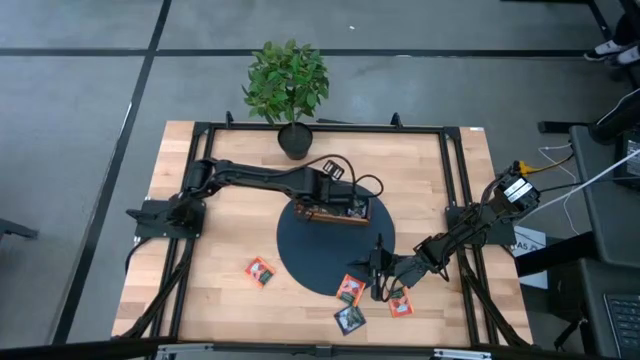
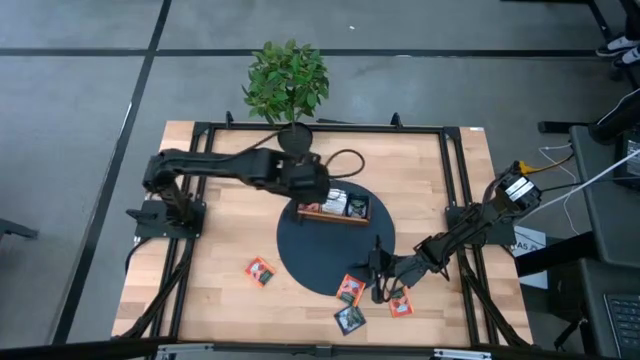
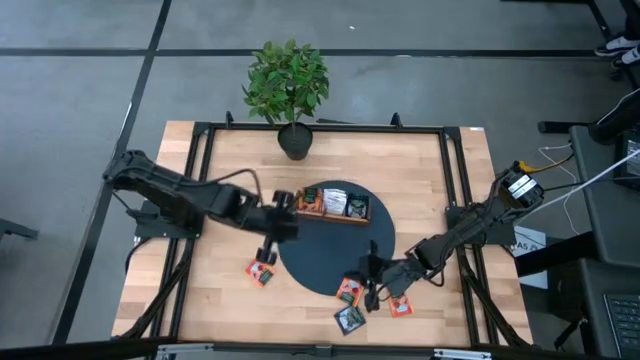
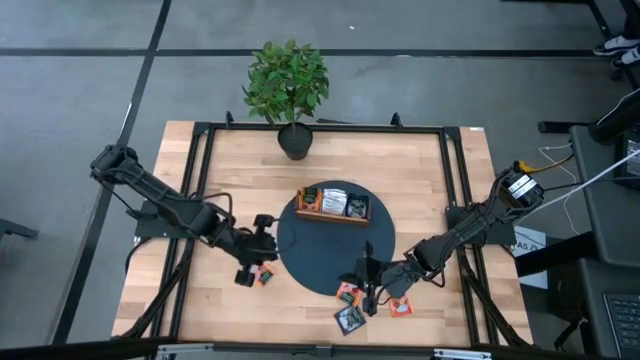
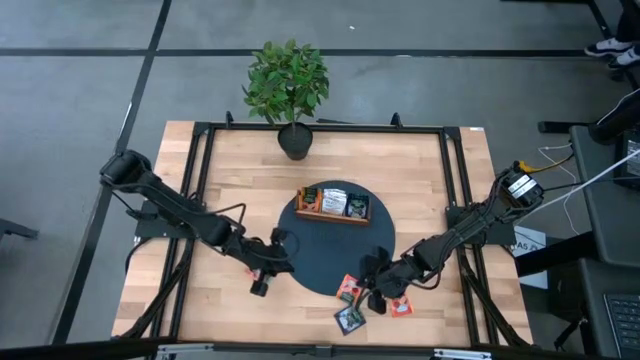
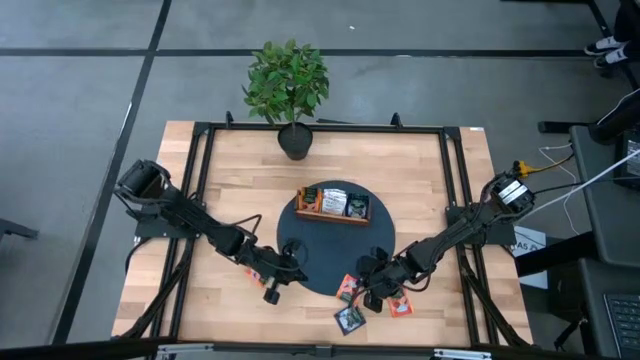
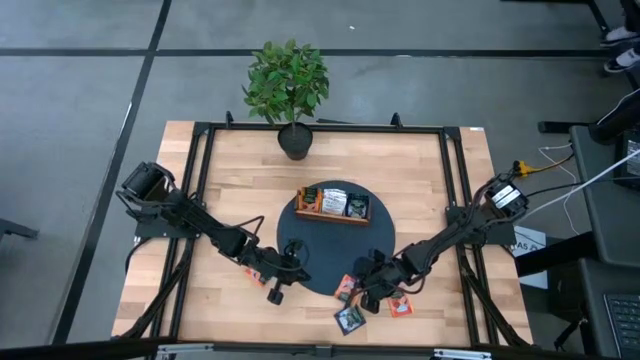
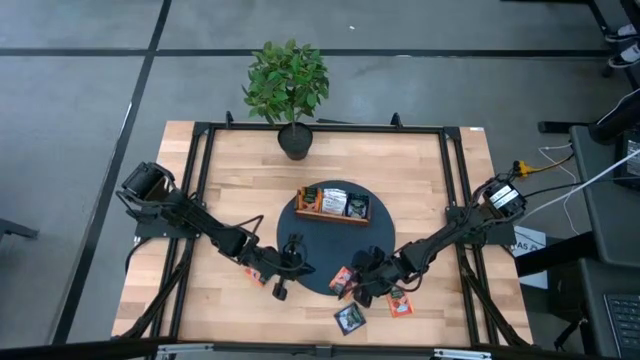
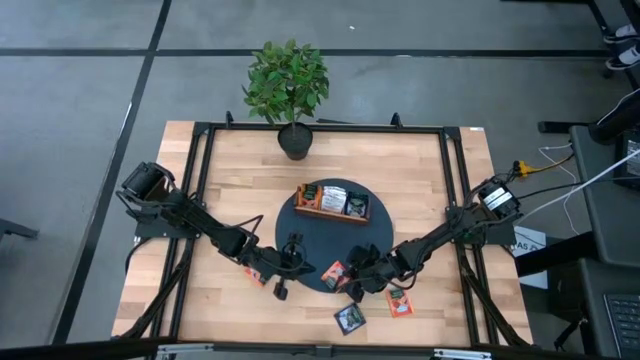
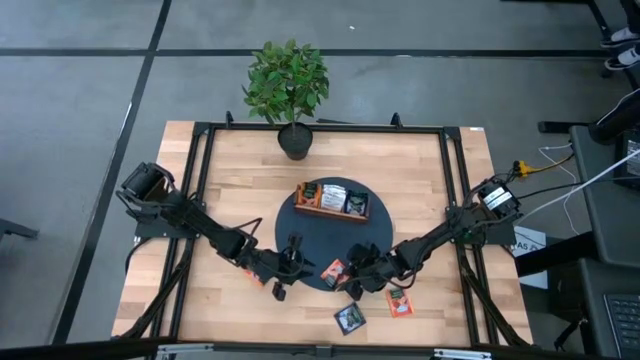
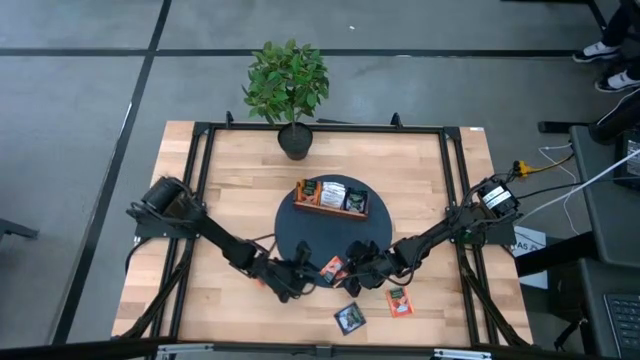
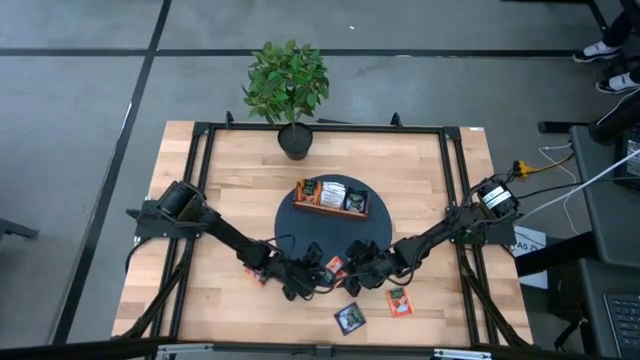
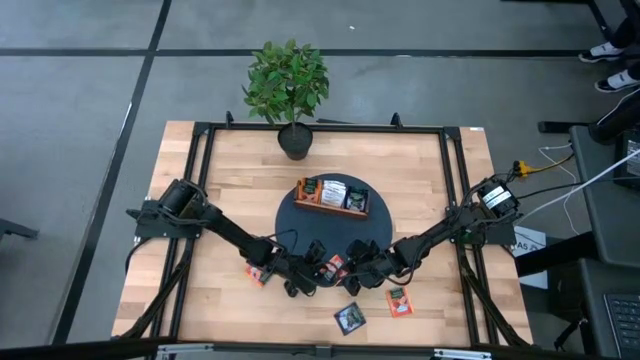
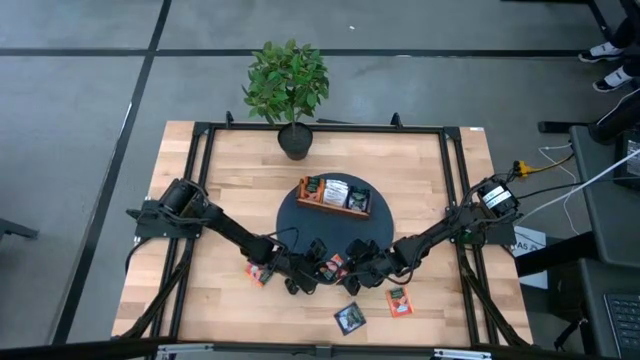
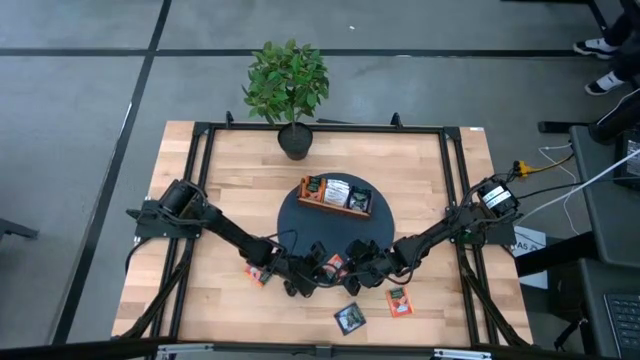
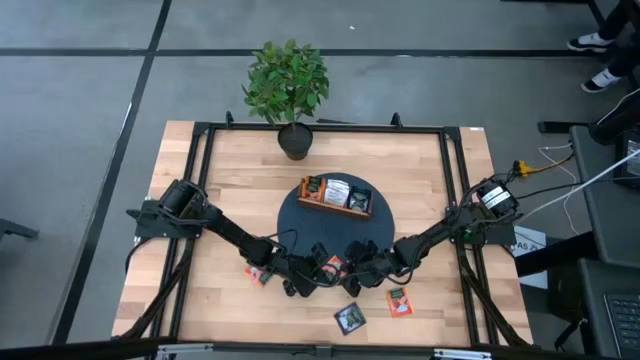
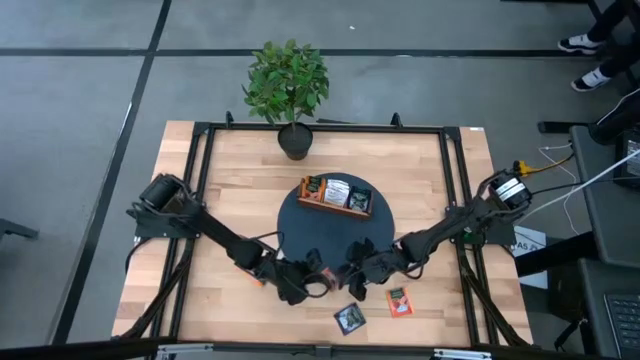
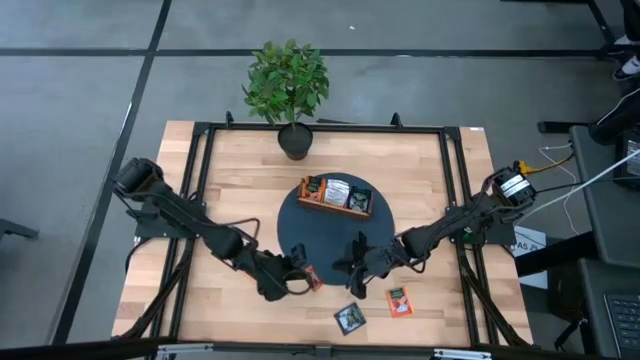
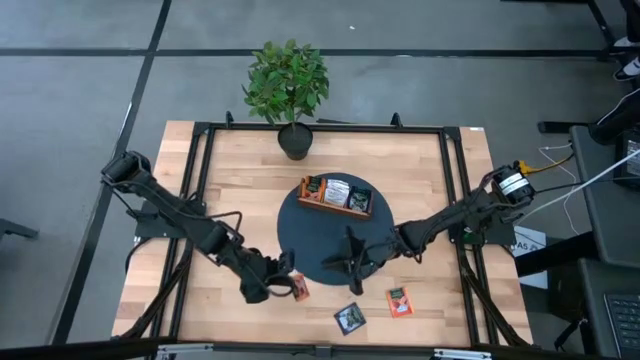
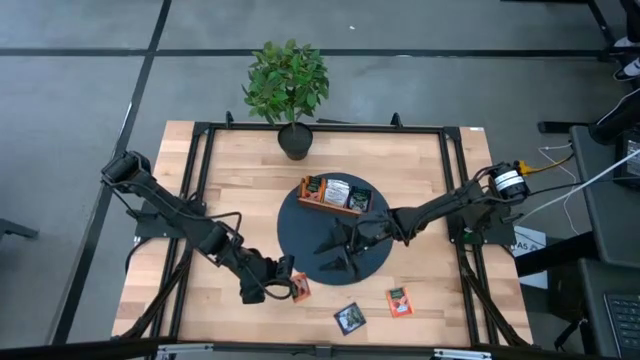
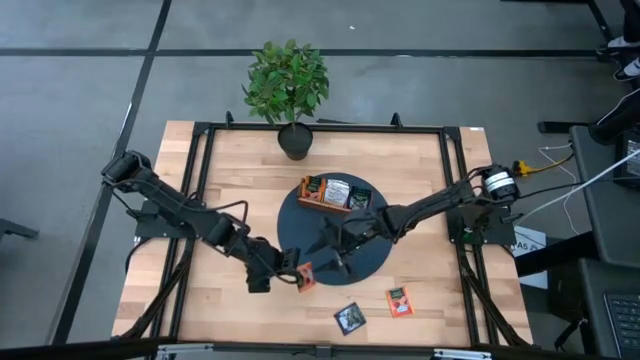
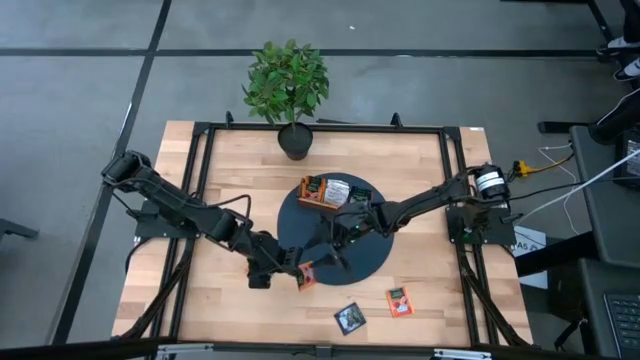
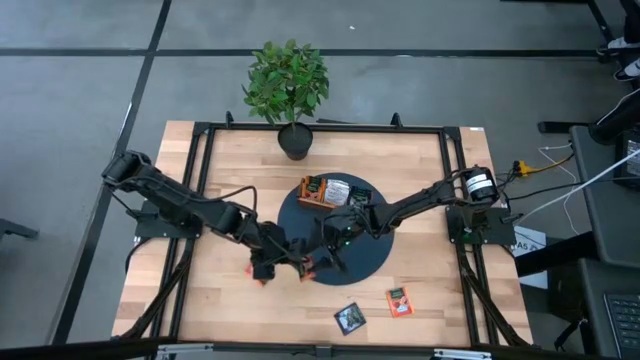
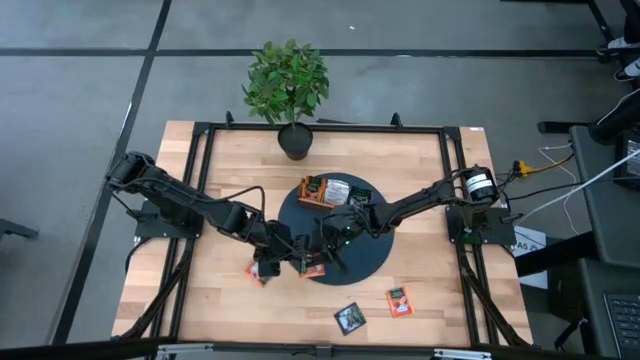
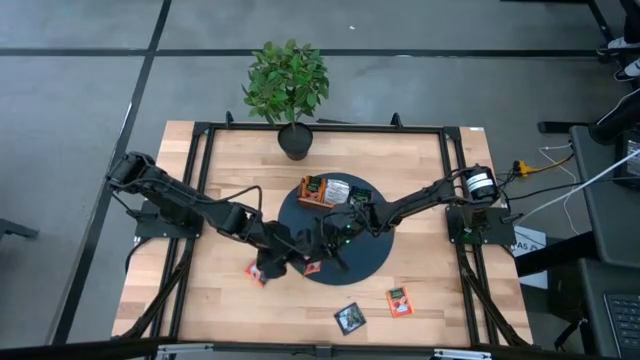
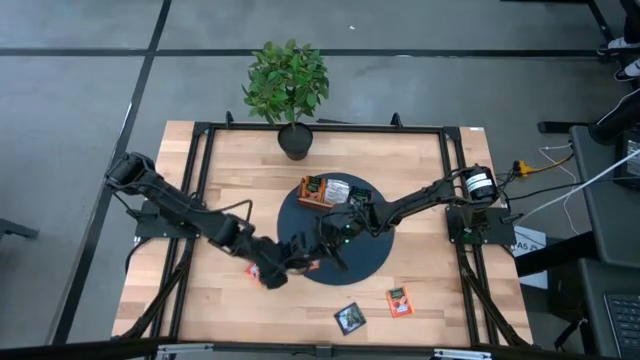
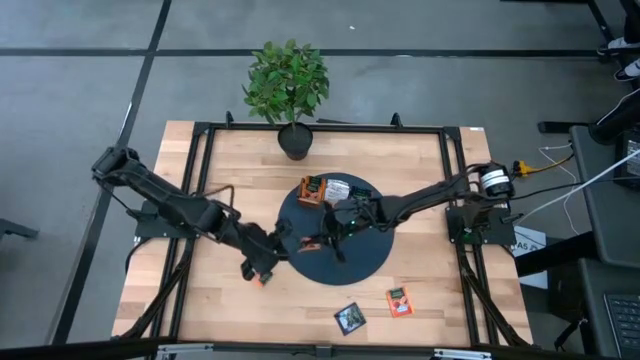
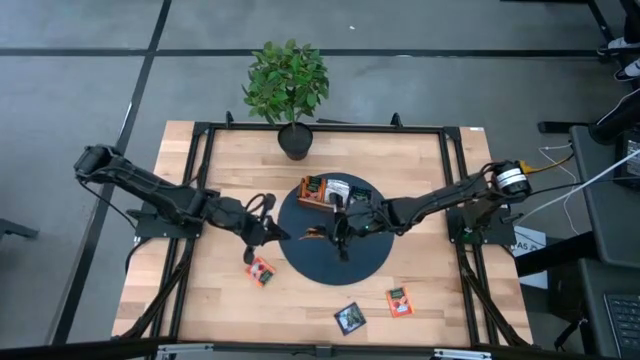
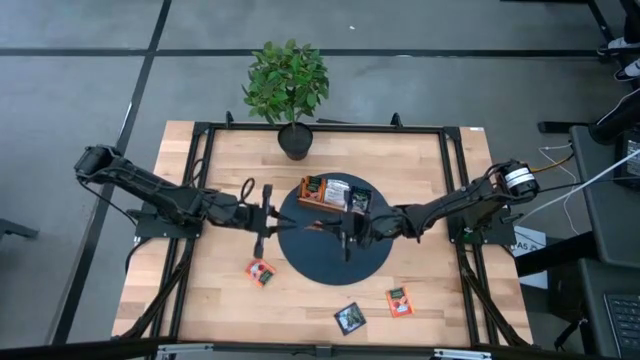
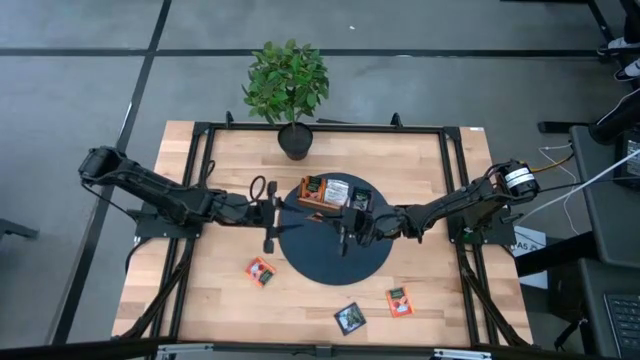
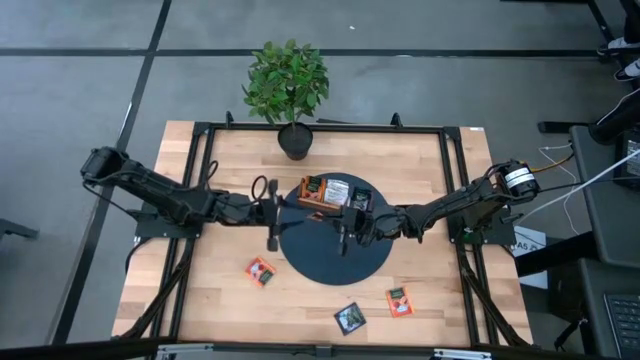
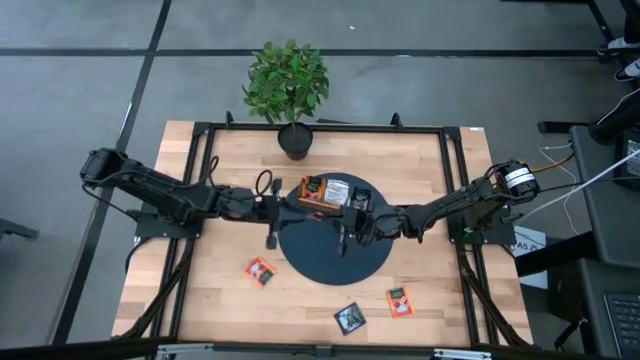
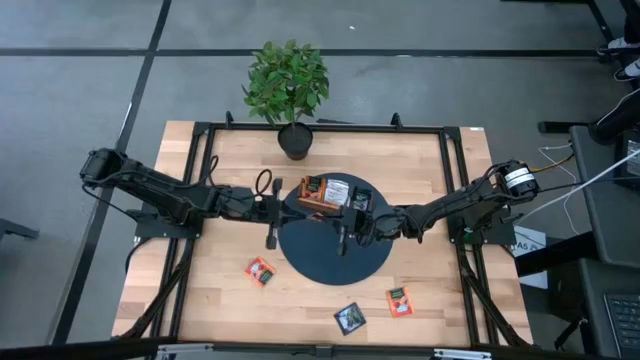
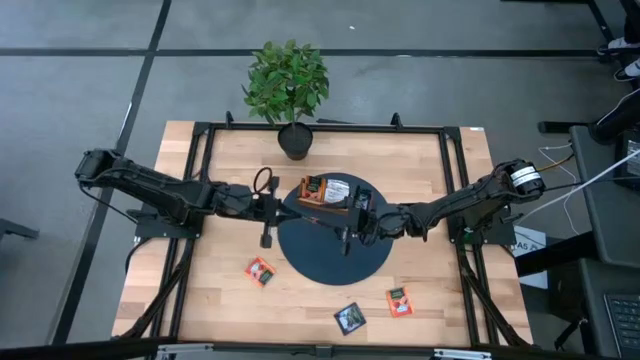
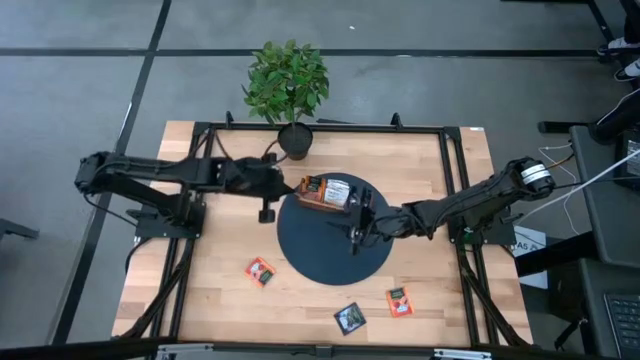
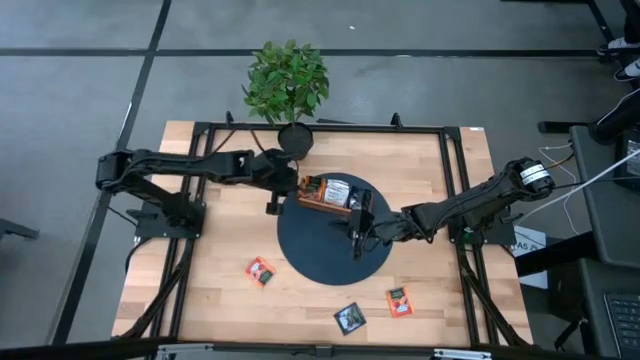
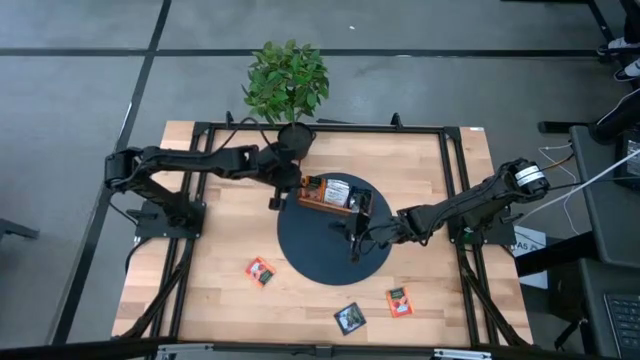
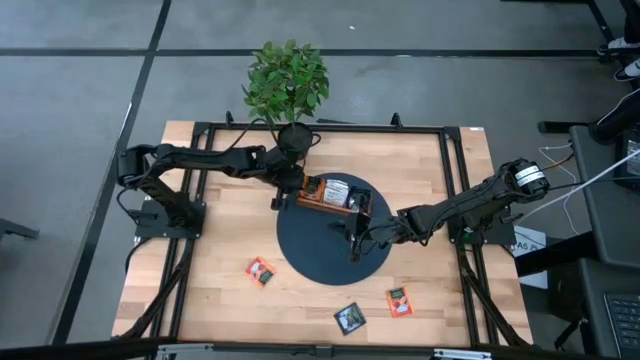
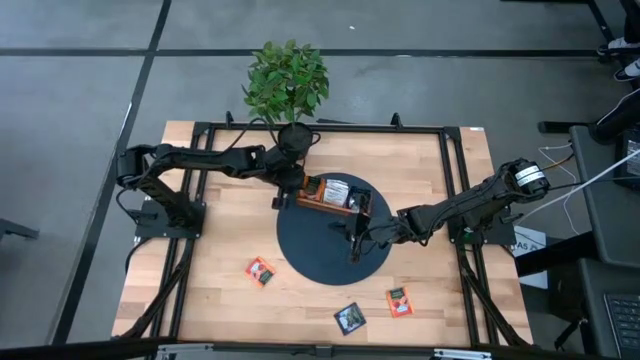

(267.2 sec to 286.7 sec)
Task: Pick & Place Tea
Put the orange tea bag into the left side of the wooden organizer

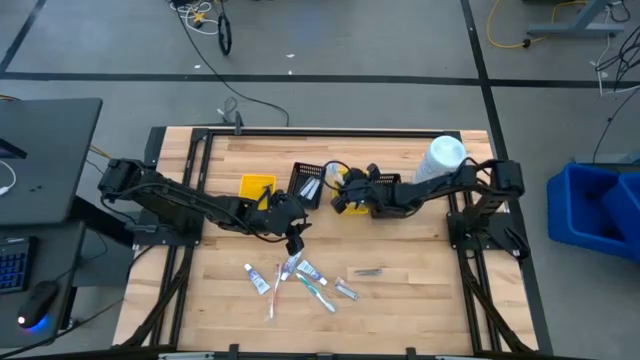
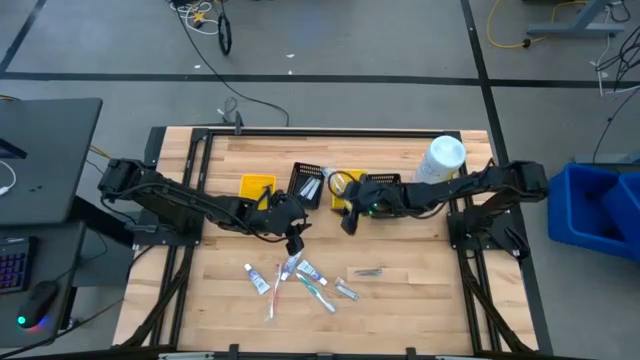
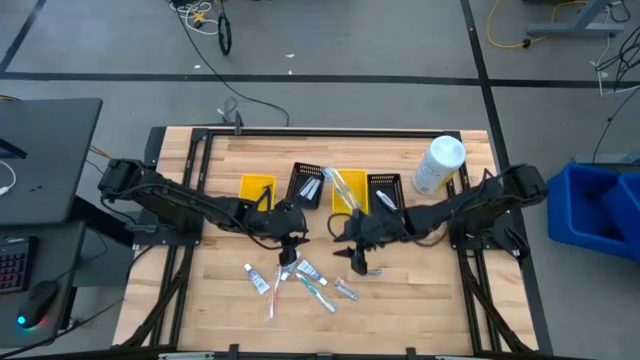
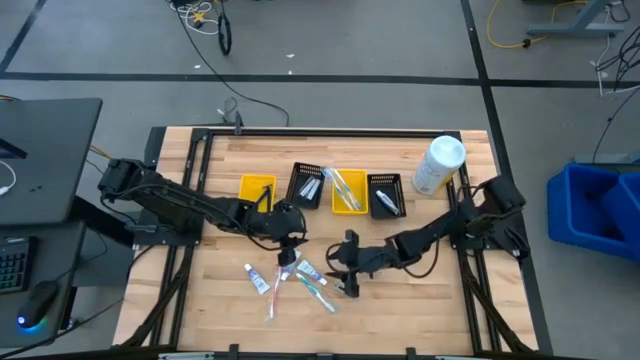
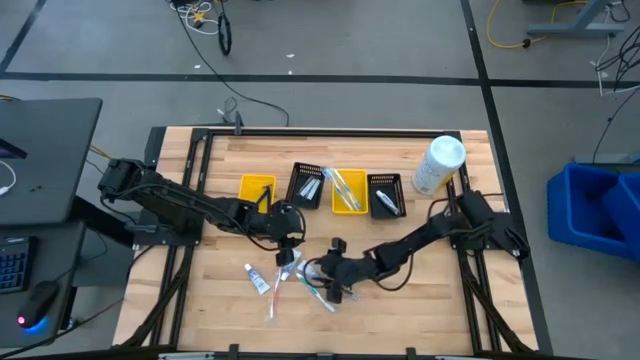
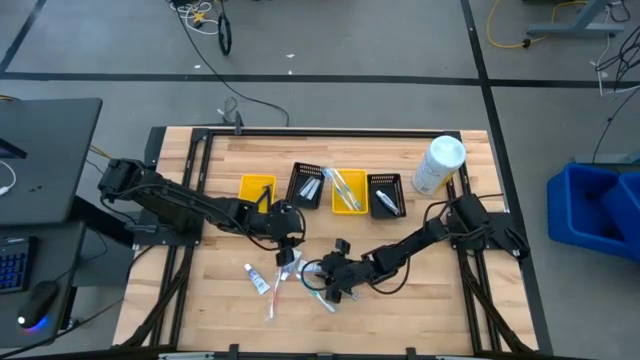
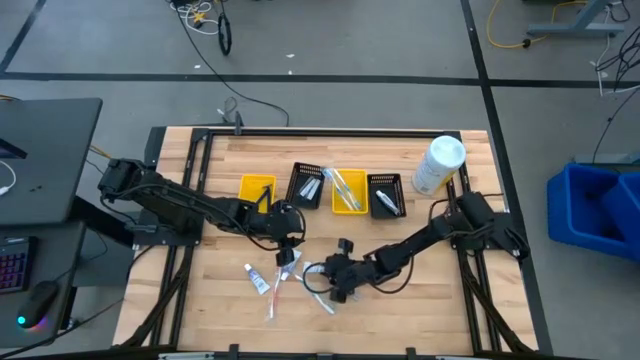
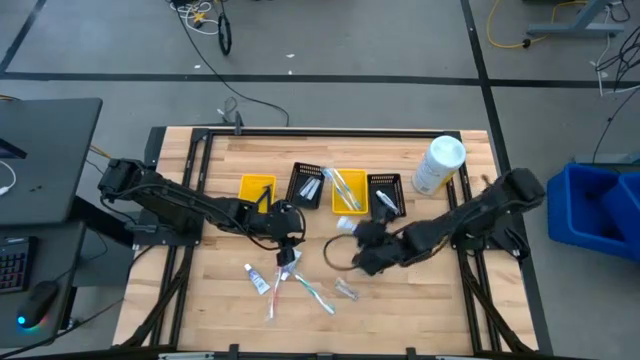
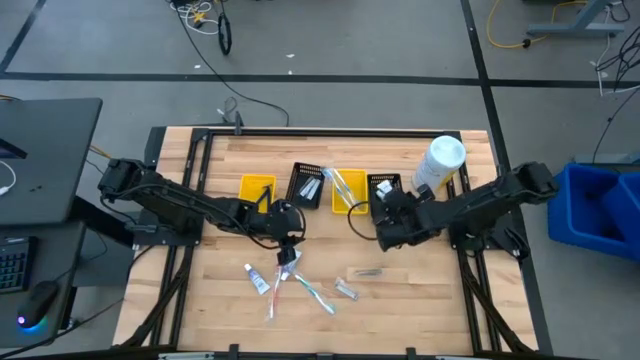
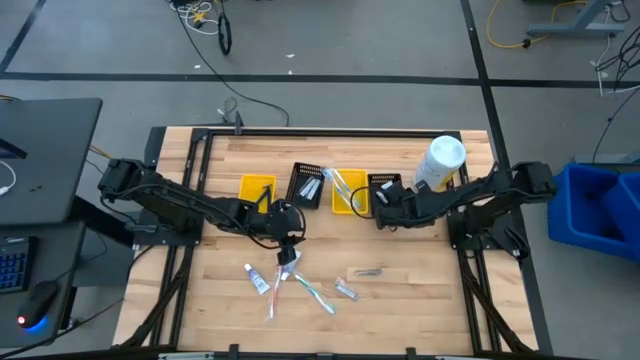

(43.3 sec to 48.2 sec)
Task: Pick & Place Travel size toiletries
Put the violet toothpaste into the right black bin
